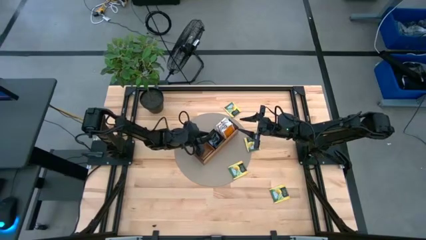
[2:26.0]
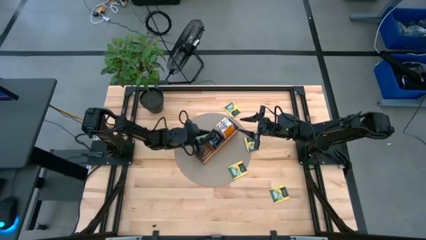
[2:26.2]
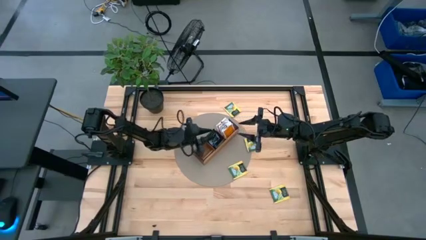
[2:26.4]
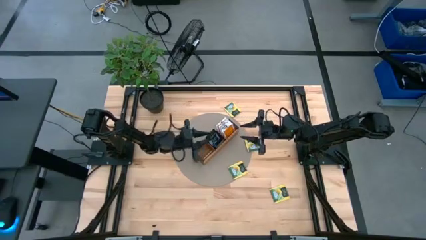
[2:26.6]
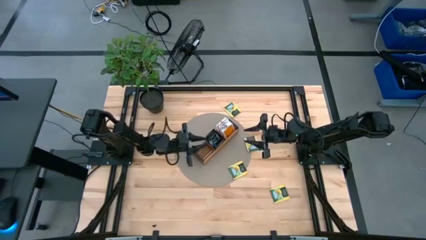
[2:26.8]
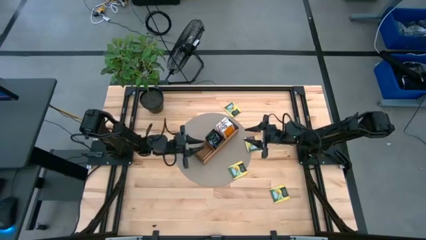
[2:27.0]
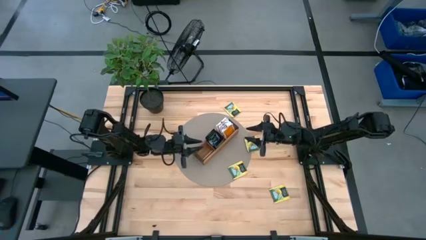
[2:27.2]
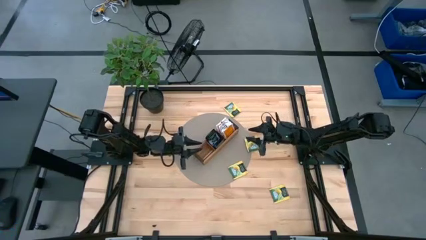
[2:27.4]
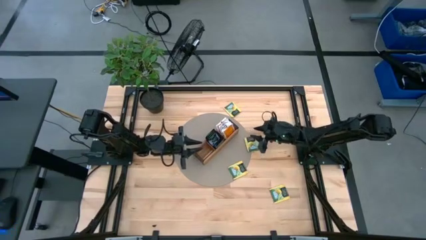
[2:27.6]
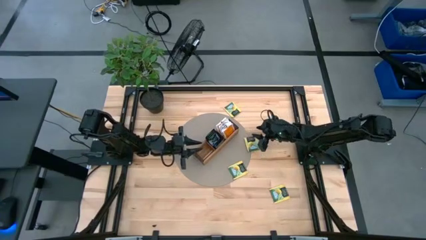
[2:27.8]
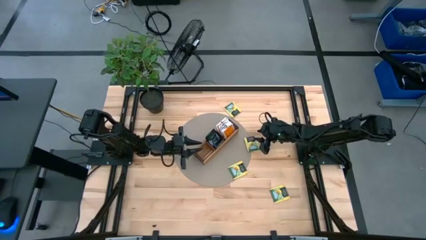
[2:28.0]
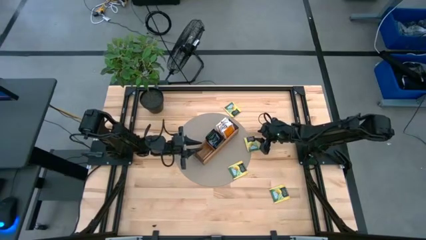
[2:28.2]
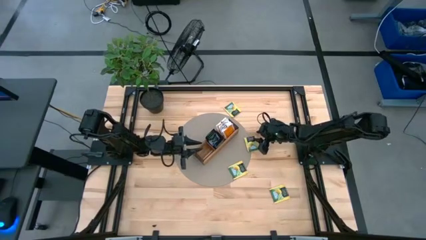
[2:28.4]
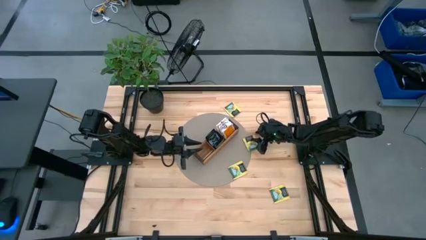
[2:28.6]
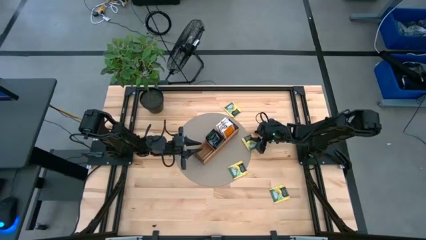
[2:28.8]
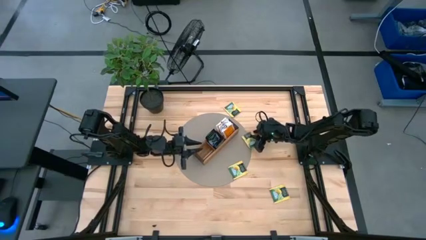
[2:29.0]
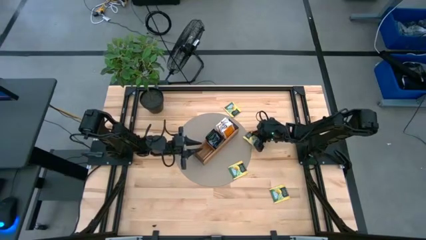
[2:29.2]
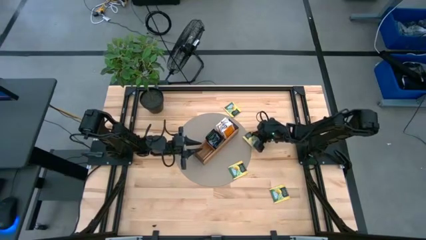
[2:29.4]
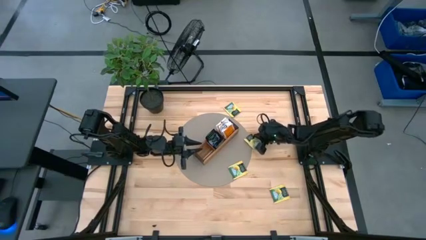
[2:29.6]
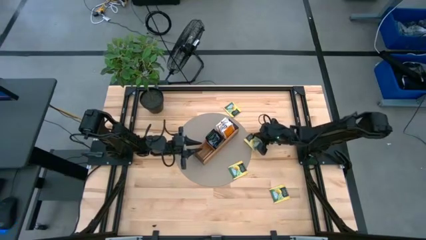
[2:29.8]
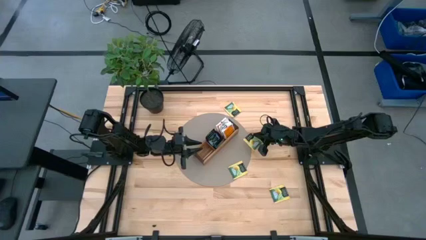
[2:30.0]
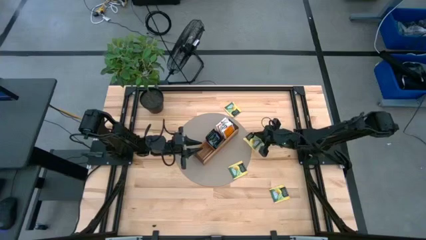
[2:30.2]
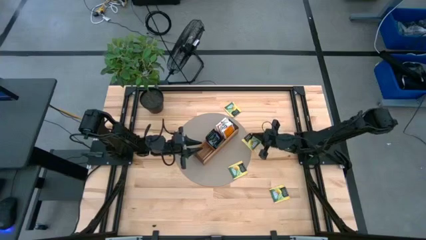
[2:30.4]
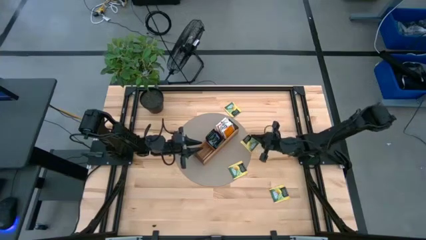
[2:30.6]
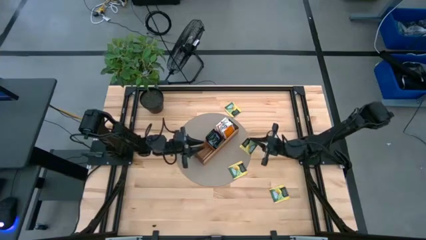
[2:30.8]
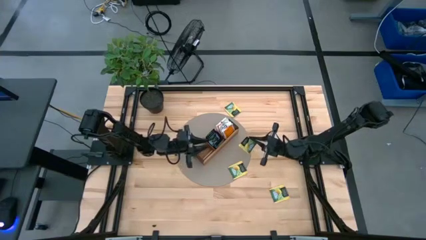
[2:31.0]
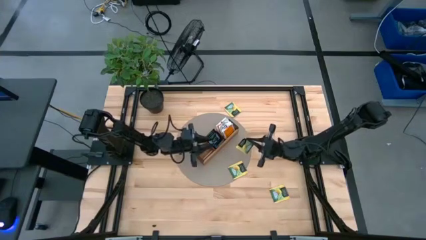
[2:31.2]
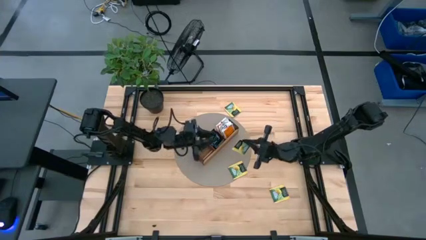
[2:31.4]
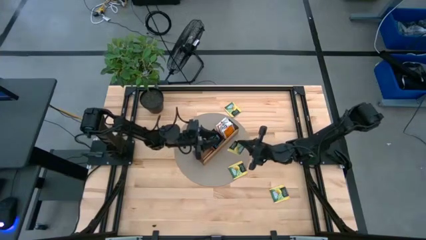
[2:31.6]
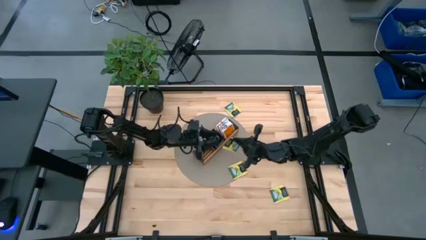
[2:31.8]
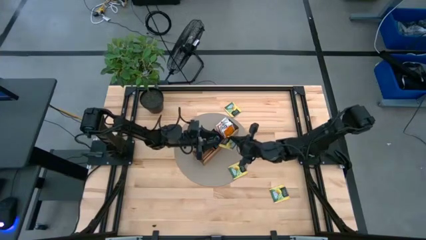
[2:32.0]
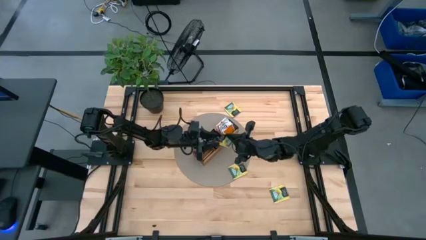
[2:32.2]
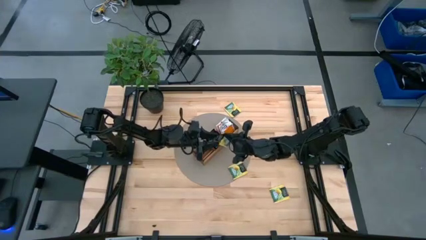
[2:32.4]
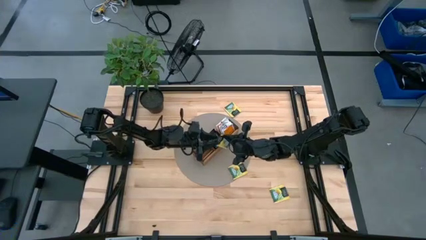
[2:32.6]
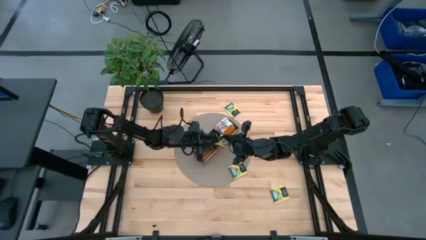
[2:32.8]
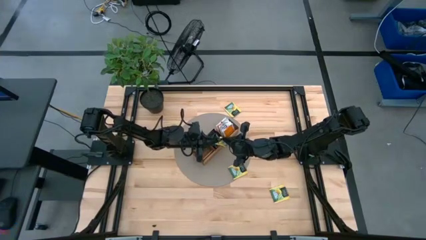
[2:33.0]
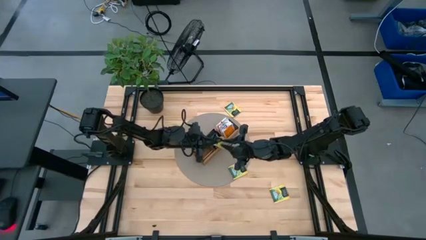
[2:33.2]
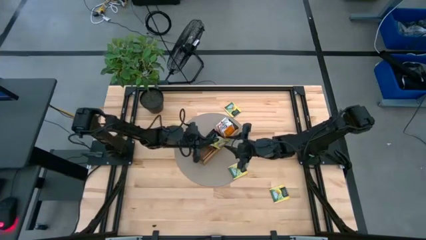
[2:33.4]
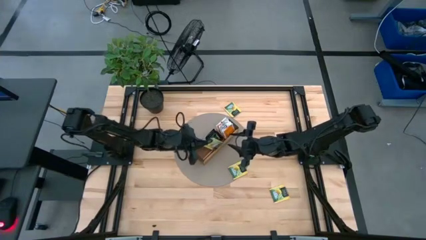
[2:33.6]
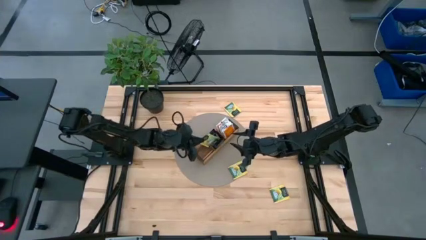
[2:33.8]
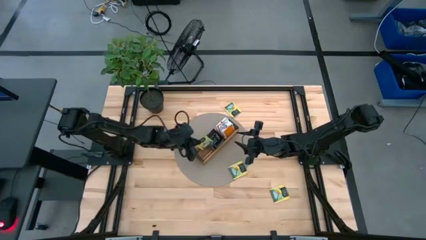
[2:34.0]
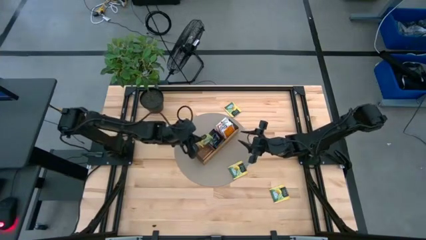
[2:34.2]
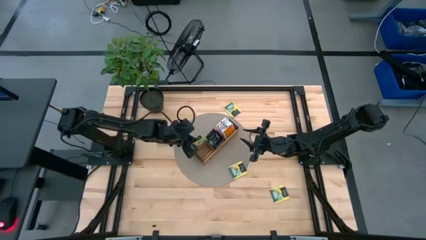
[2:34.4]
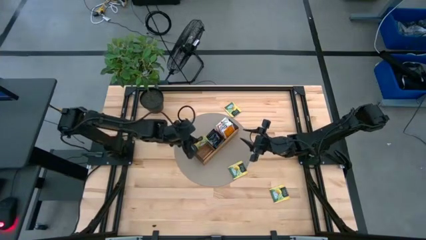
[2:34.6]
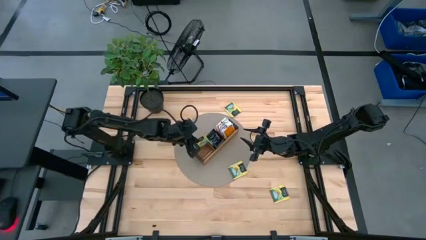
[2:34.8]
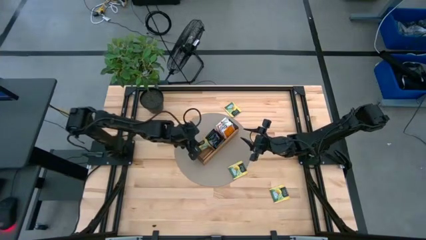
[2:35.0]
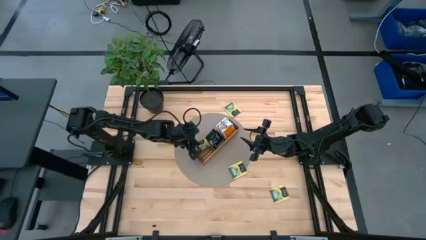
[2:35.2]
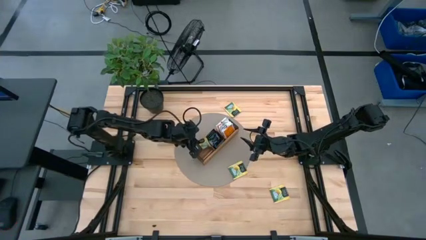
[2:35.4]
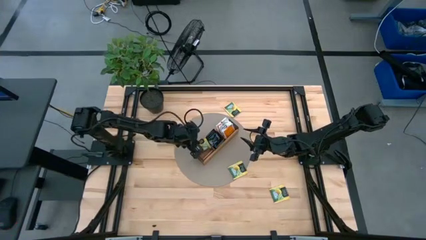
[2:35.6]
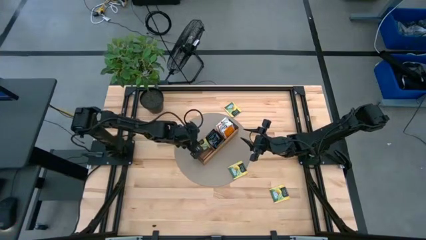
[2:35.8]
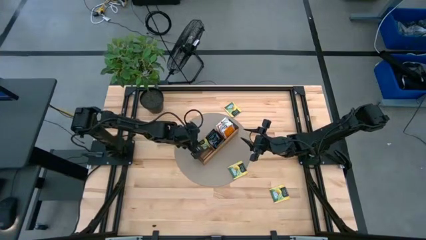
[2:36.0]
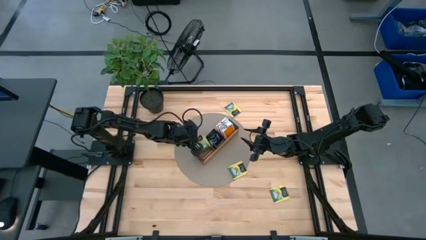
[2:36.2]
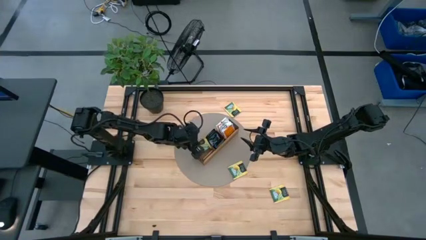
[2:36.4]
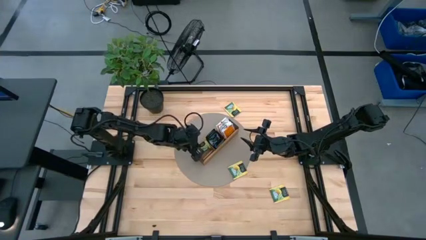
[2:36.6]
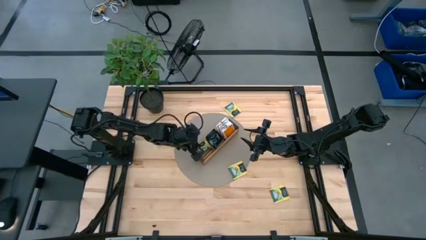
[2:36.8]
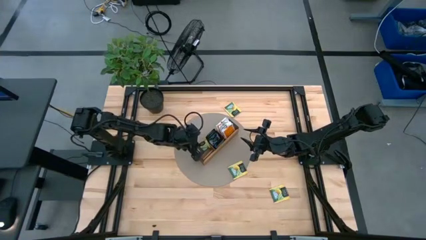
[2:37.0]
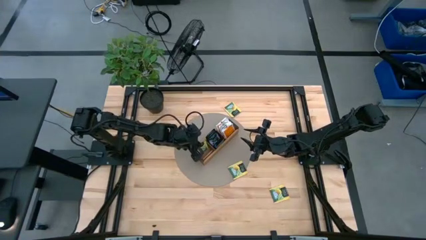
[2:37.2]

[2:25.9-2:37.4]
Task: Pick & Place Tea
Put the yellow tea bag into the left section of the wooden organizer

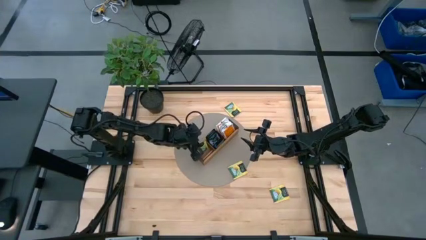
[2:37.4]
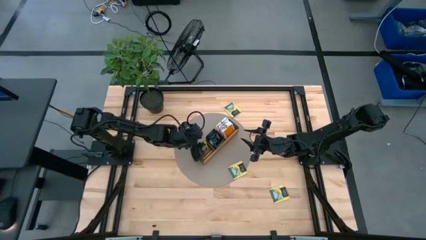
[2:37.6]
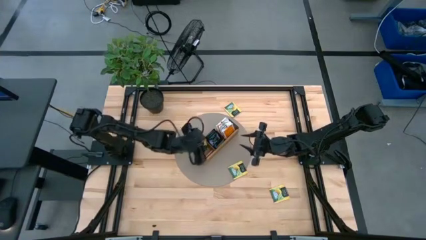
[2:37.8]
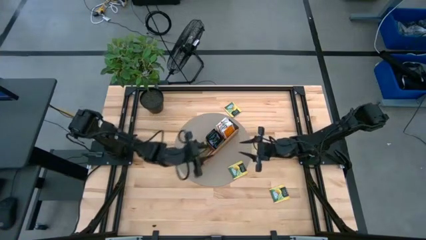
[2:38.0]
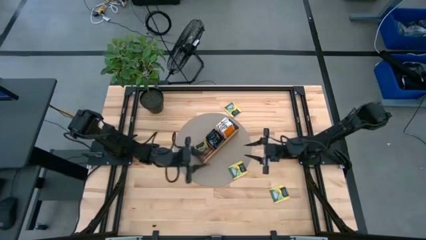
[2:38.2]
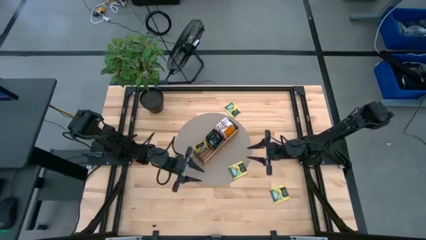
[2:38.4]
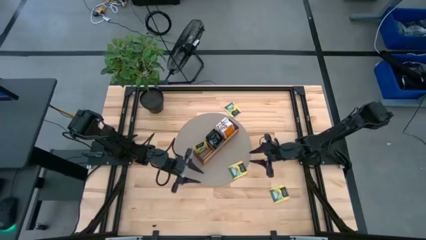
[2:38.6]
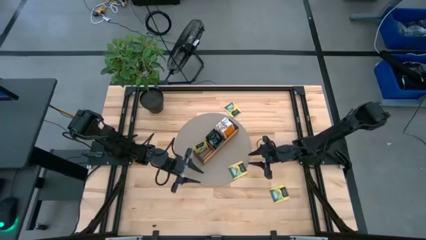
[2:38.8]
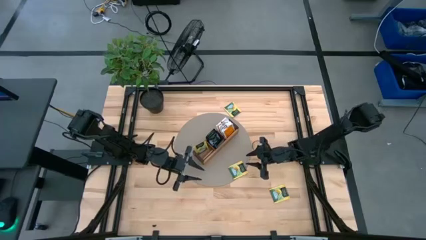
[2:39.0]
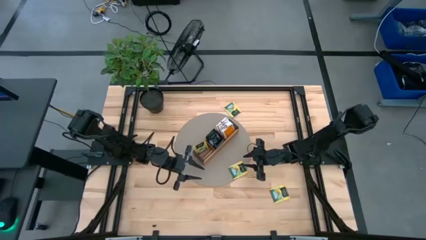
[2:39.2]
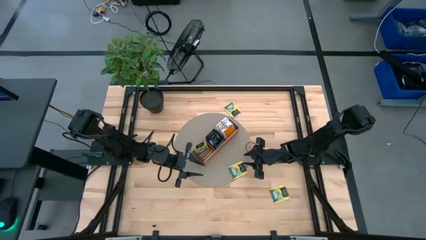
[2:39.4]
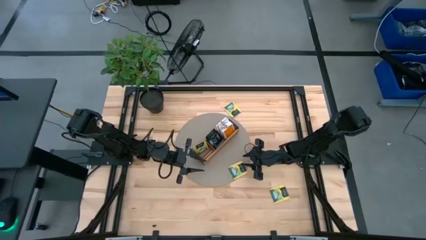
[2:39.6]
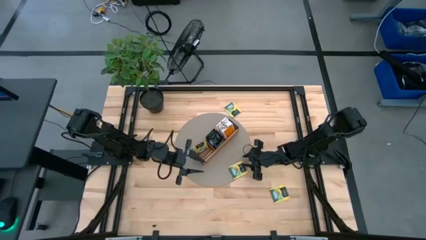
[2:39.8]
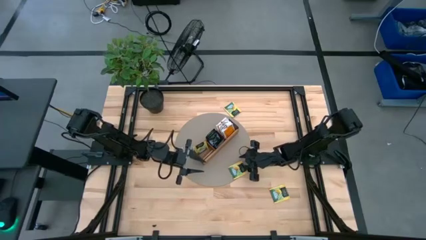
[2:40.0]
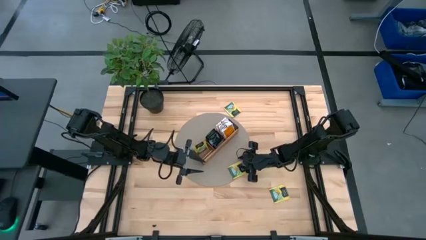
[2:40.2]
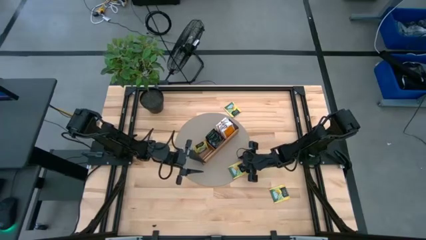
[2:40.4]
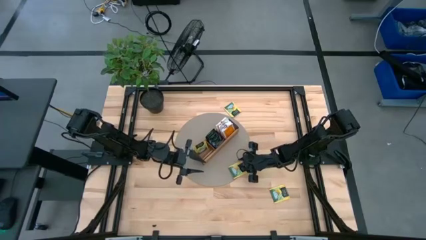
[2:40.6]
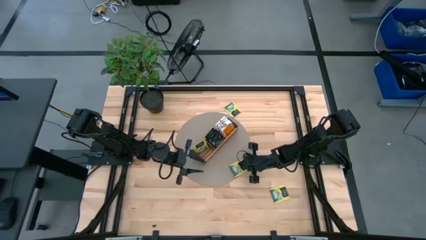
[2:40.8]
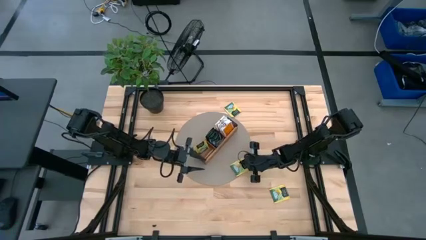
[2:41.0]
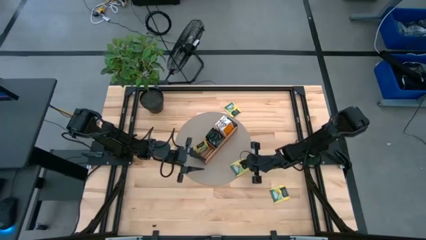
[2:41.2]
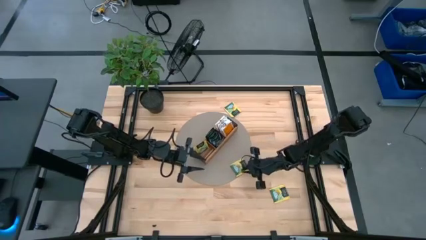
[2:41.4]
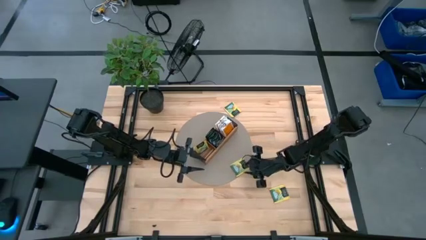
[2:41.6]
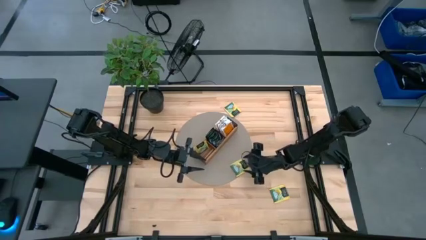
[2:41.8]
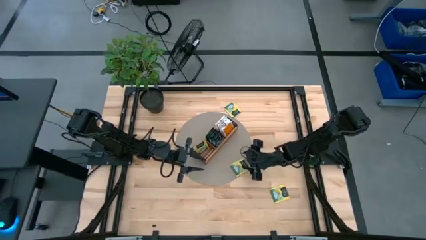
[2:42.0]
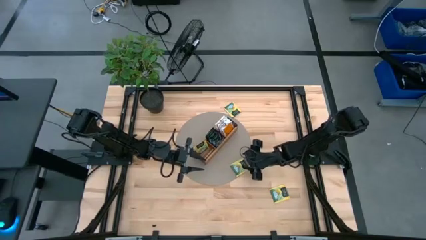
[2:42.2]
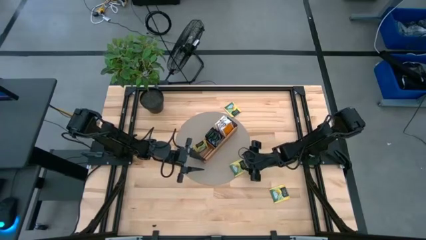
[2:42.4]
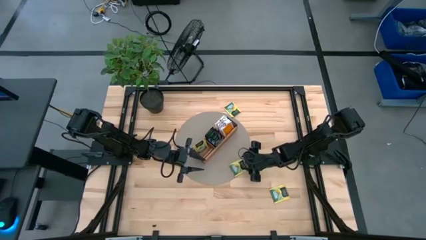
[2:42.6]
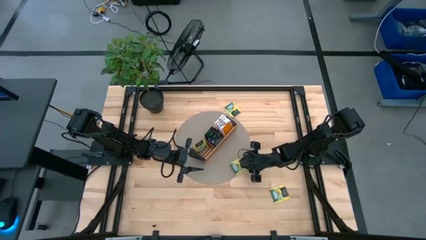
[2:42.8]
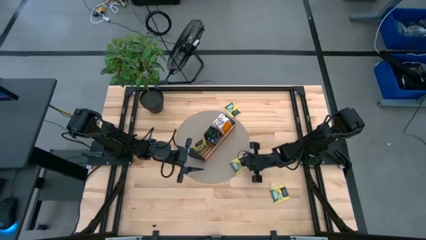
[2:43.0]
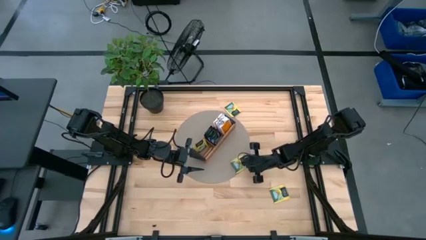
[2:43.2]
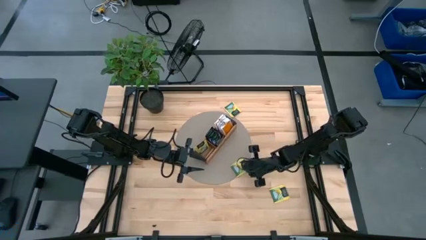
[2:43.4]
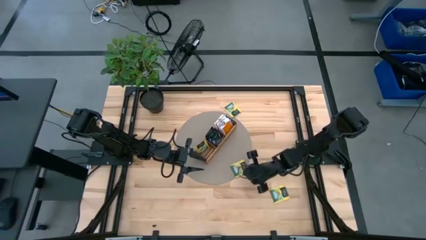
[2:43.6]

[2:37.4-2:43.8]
Put the yellow tea bag into the left section of the wooden organizer
